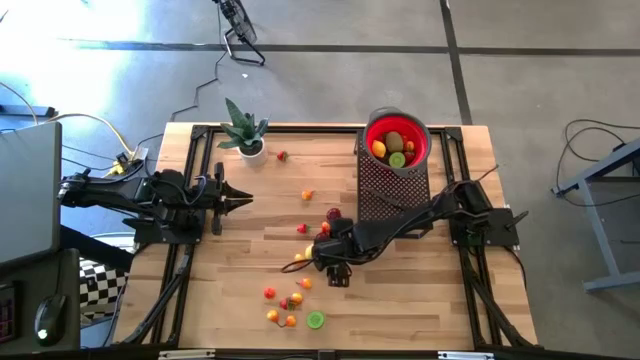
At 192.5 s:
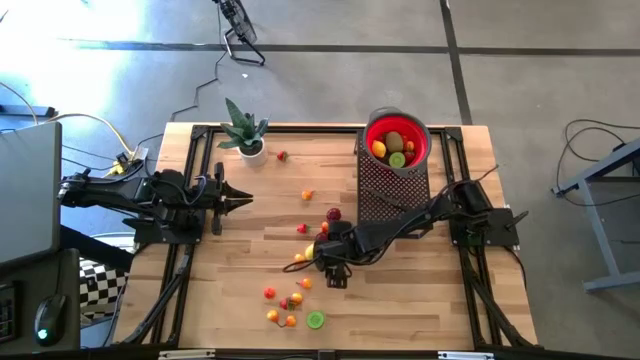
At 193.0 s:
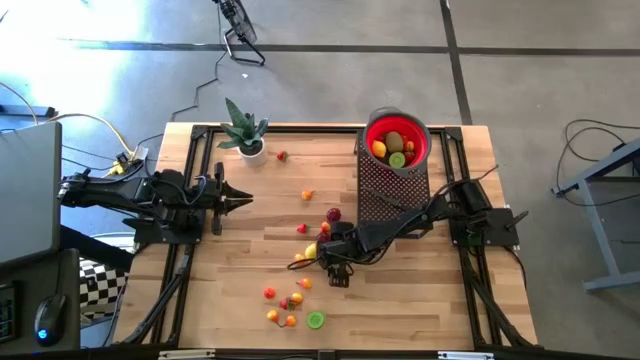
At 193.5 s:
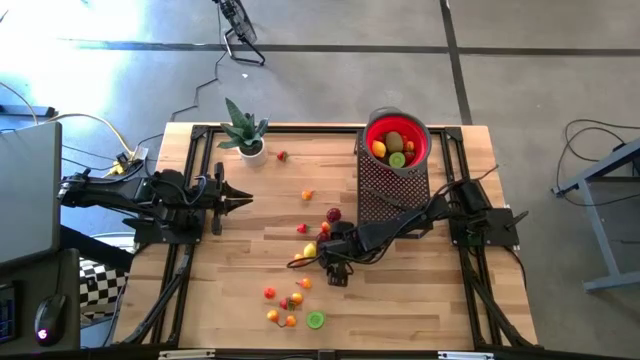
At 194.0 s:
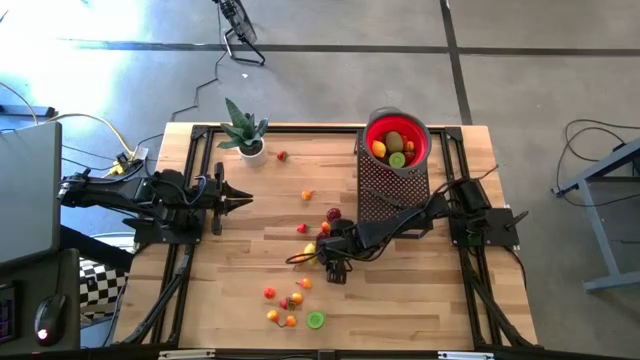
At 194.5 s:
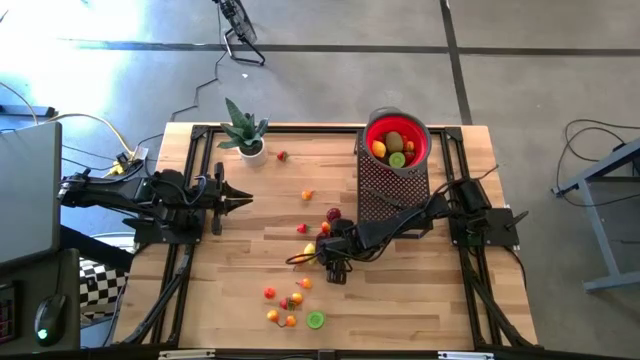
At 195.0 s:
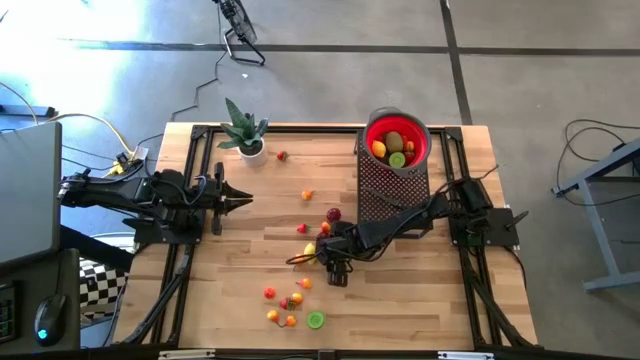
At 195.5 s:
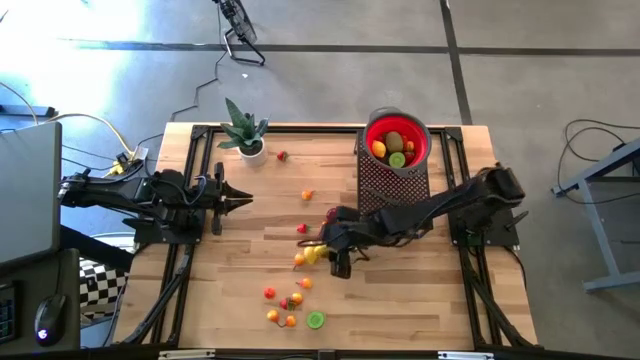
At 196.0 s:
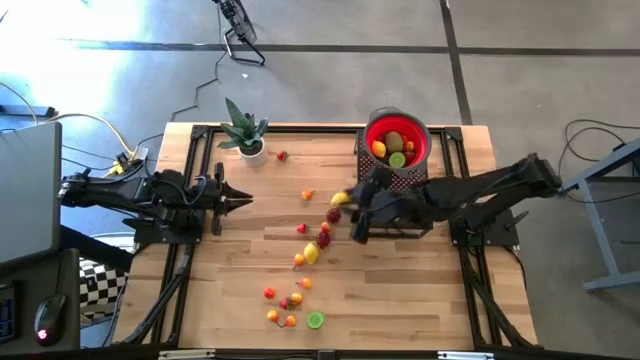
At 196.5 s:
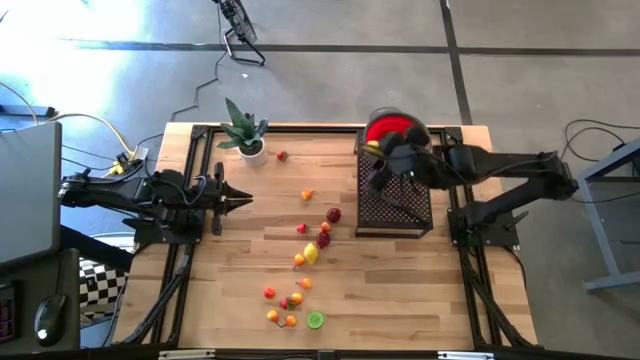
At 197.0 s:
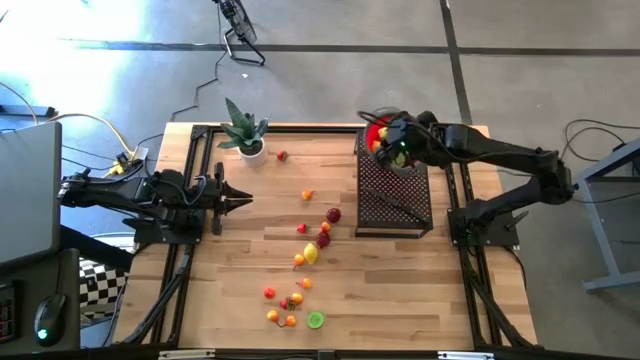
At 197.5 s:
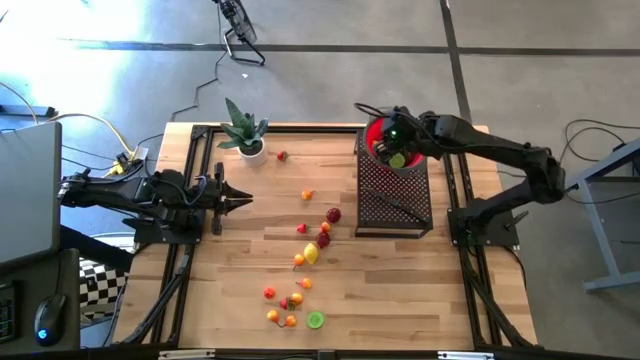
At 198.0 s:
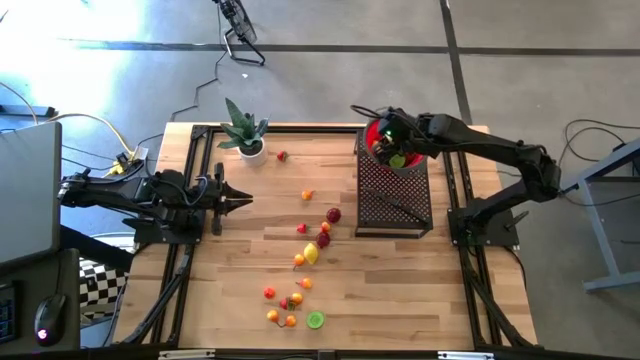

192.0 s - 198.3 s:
Task: Pick & Place Fruit
Put the lemon into the strainer bowl on the shelf

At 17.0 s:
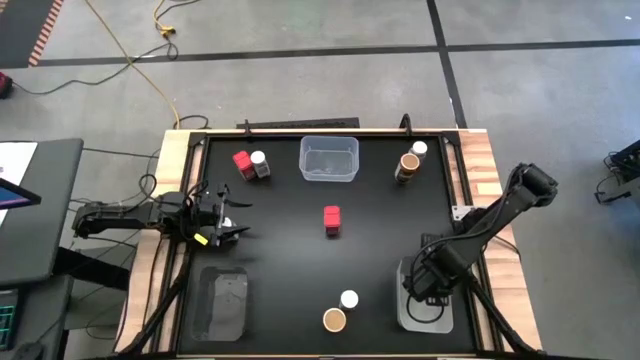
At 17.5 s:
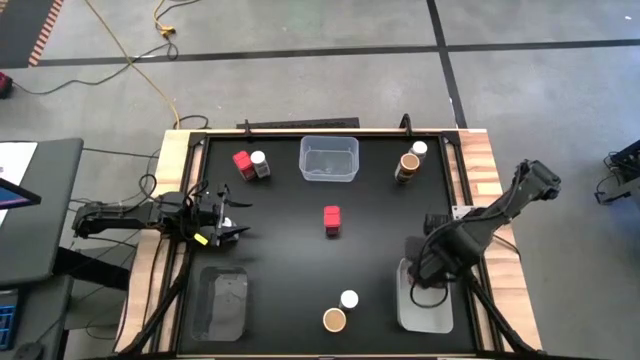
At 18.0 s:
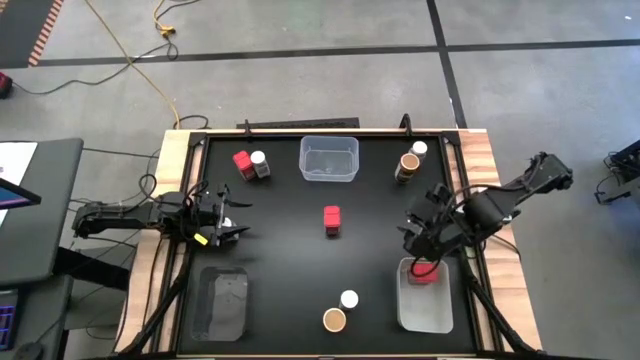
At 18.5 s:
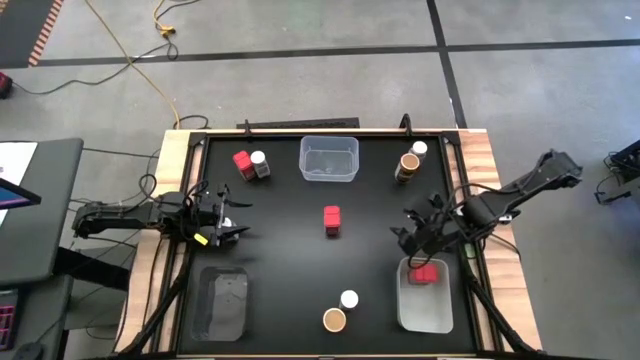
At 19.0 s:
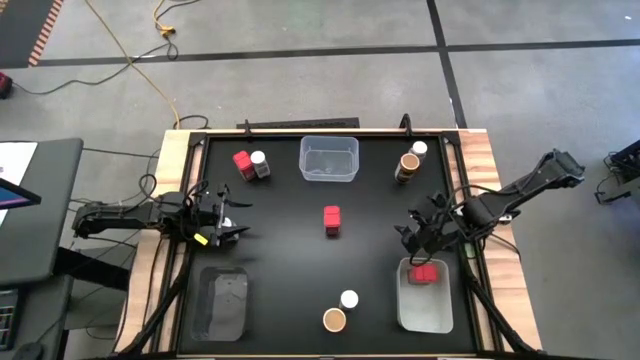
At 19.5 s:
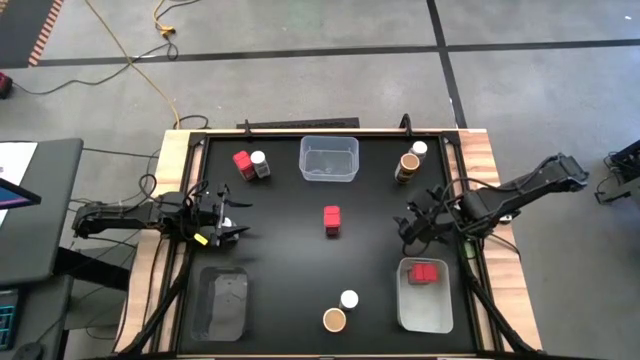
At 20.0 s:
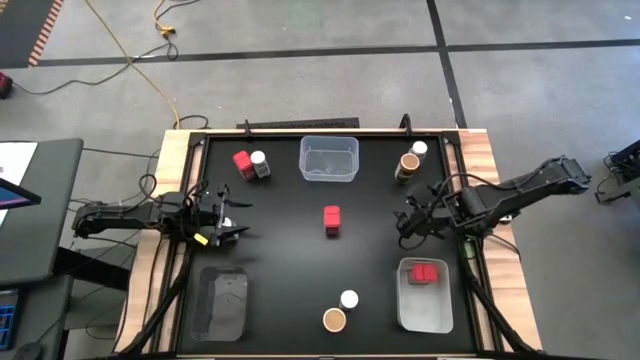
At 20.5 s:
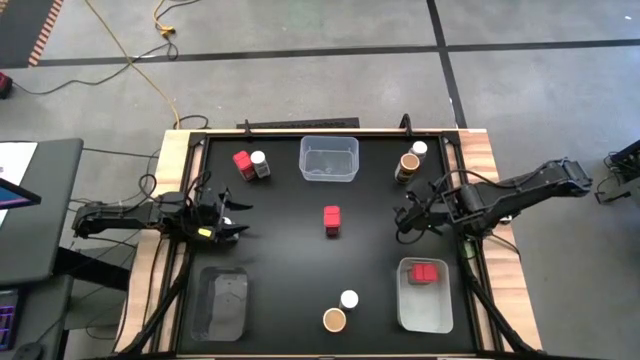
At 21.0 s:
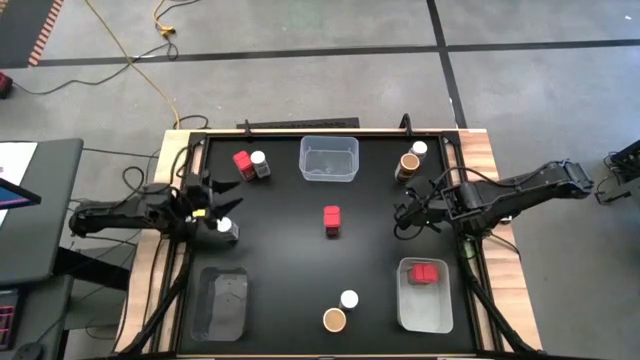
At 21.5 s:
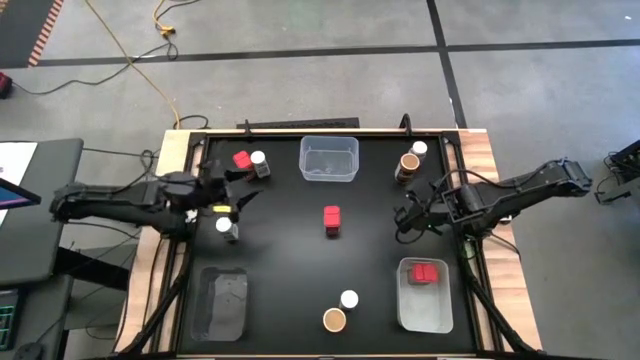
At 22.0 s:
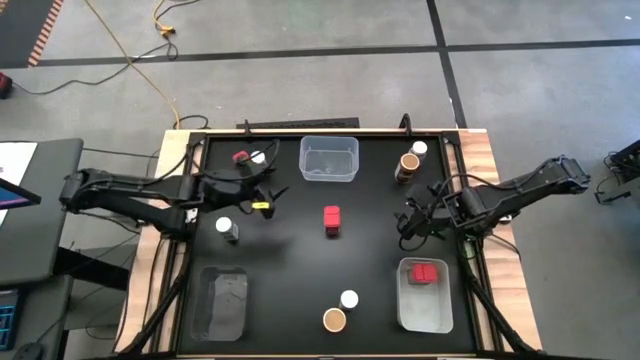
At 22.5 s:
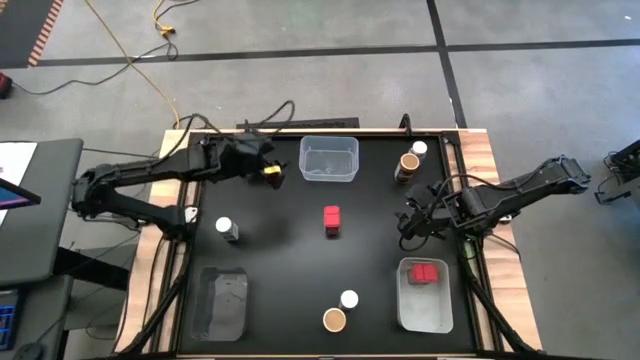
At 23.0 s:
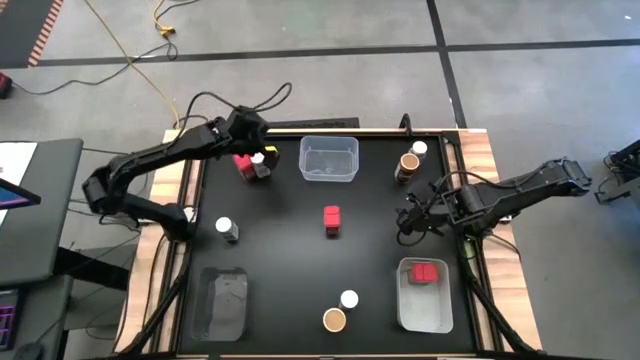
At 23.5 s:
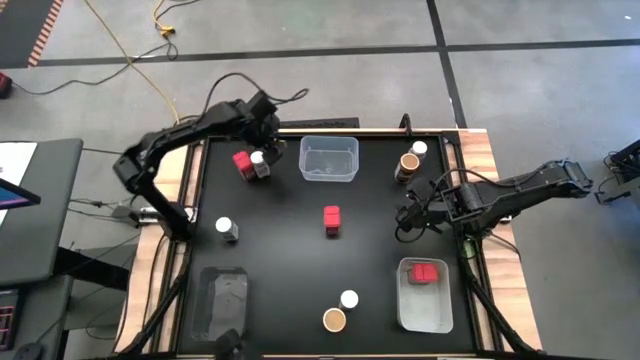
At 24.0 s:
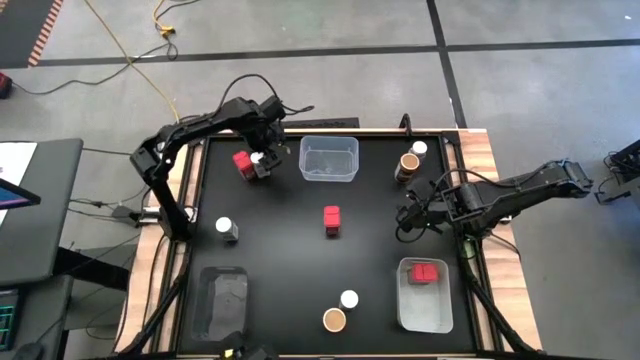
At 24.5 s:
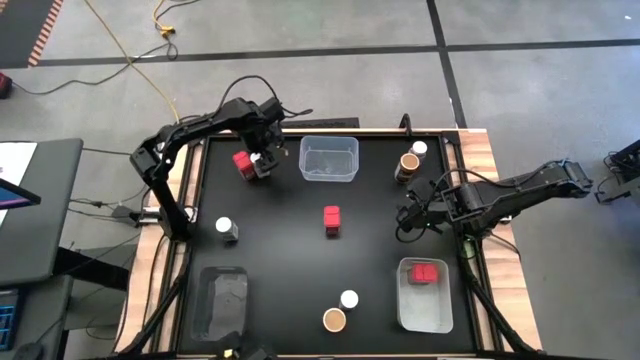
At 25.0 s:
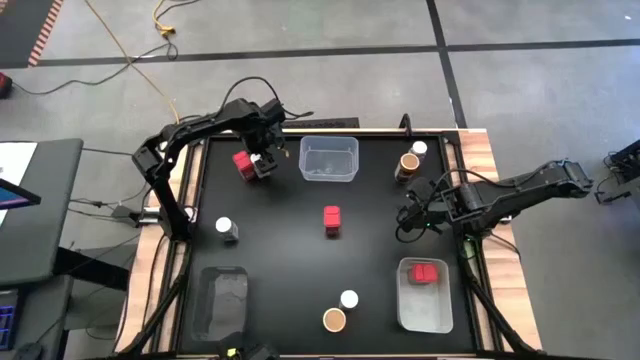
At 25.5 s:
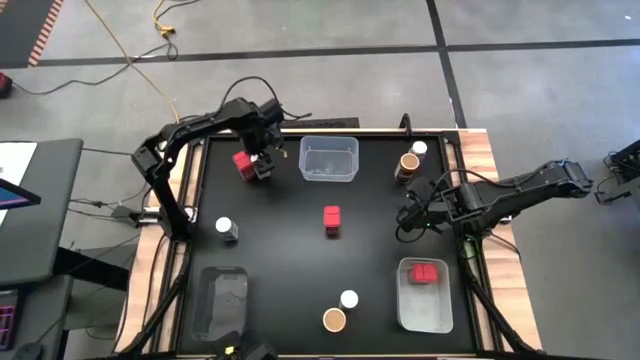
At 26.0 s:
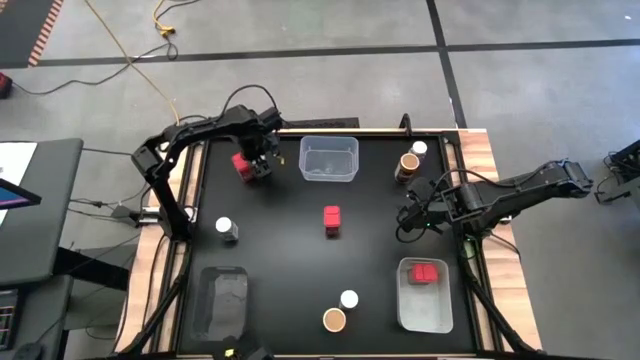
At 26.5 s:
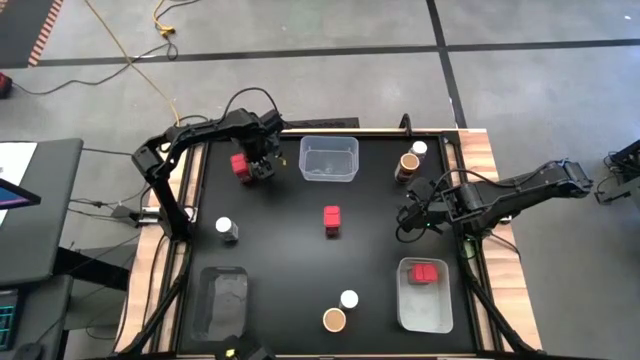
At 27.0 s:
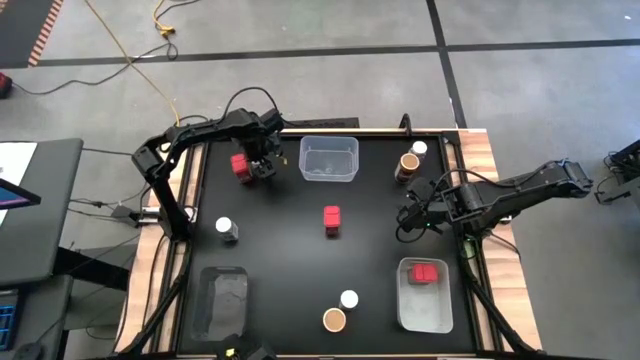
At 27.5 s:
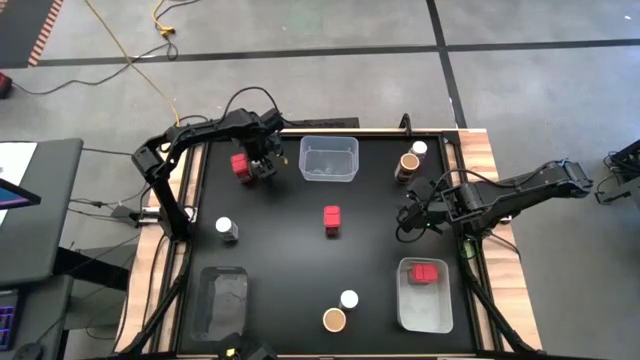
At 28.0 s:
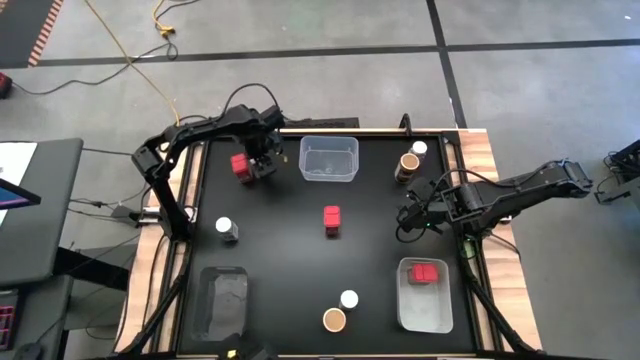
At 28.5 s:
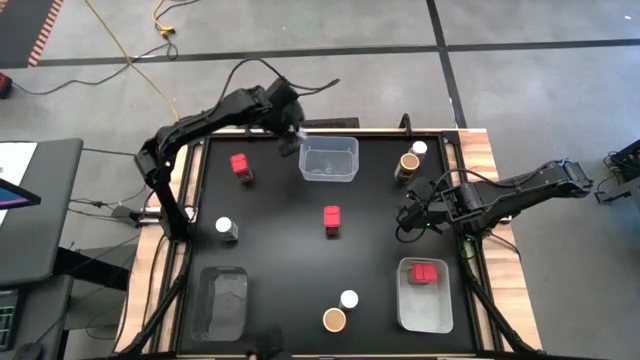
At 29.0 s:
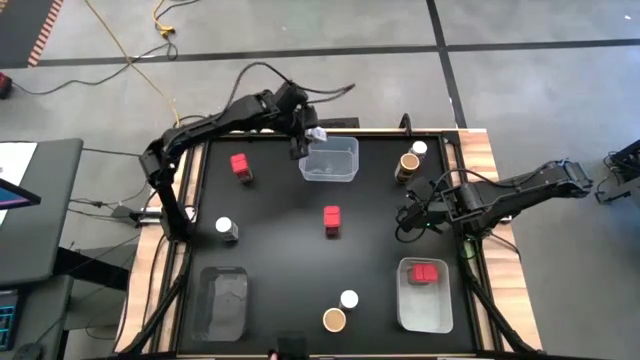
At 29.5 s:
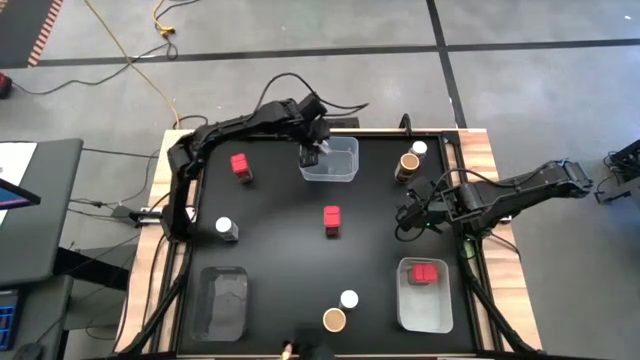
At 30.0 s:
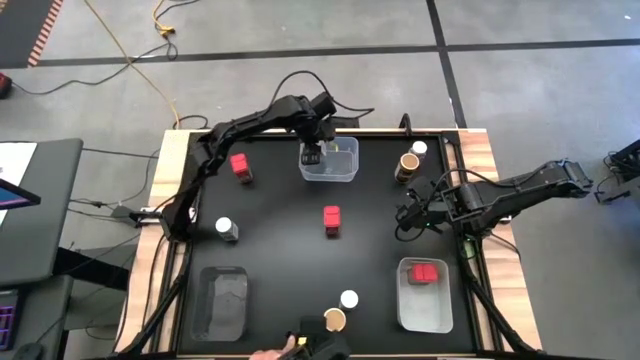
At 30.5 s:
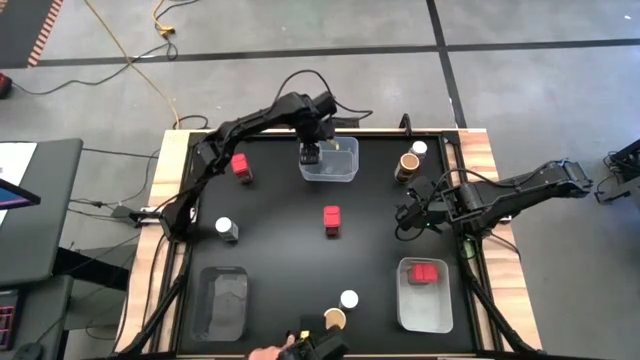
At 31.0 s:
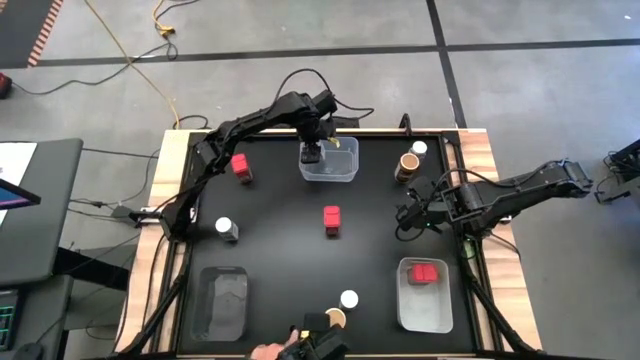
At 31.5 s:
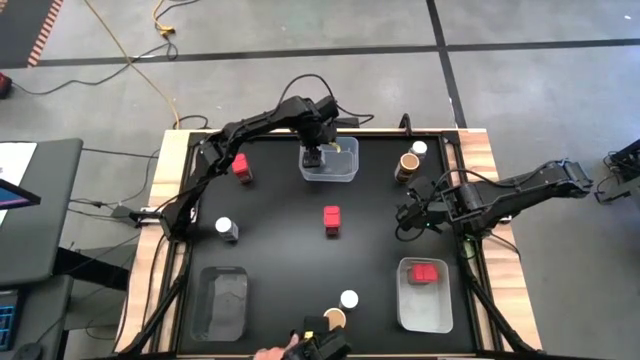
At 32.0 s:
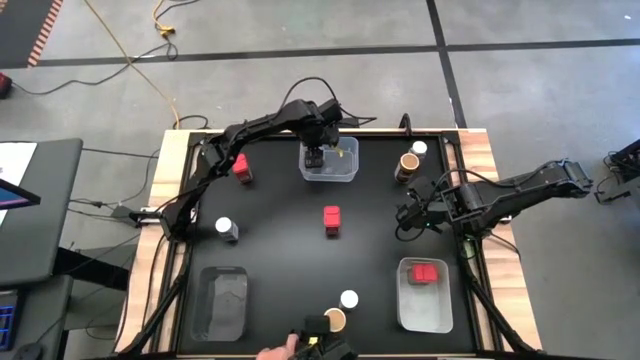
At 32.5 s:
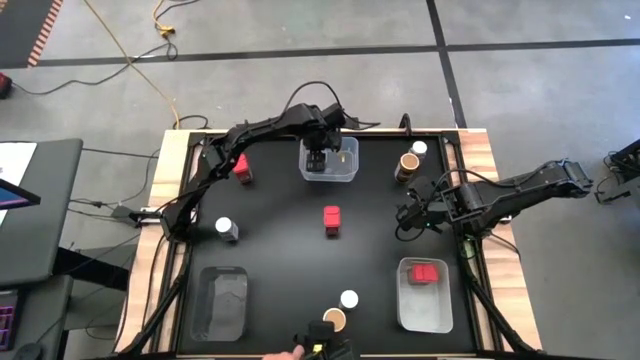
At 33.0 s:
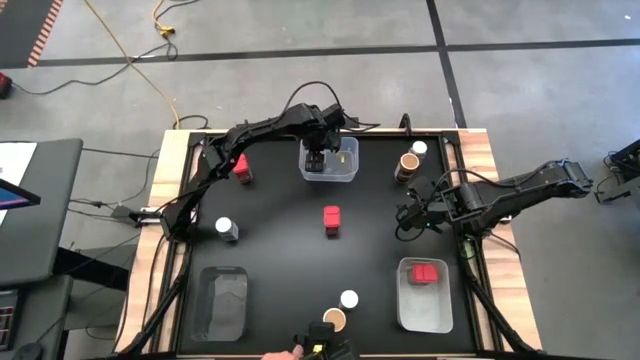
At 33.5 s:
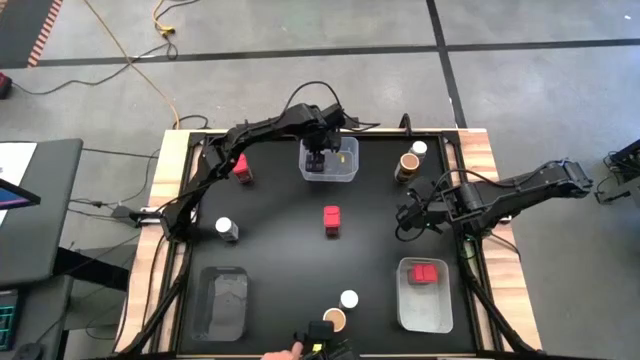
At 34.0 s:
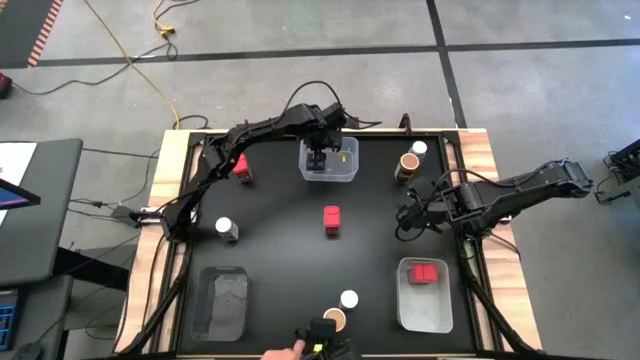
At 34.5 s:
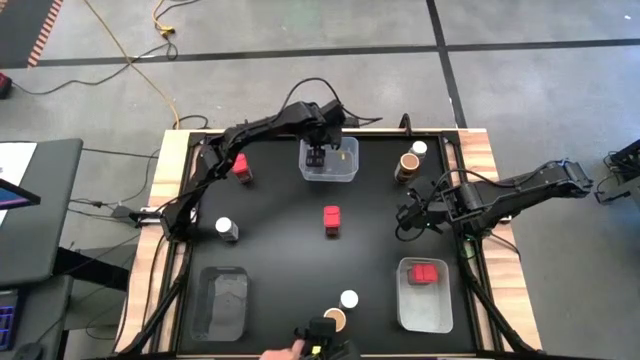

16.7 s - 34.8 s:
Task: Sort spices by type
Put the top left spice bottle into the transparent bin
